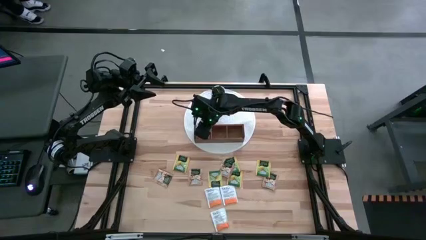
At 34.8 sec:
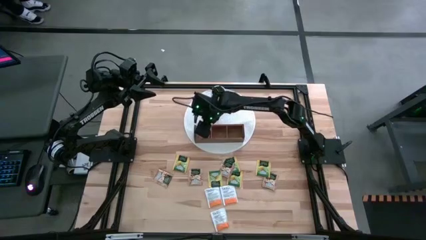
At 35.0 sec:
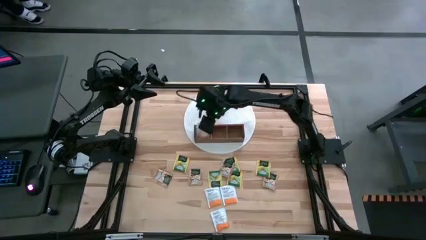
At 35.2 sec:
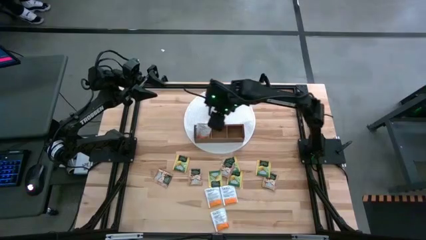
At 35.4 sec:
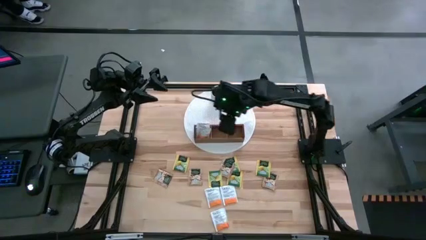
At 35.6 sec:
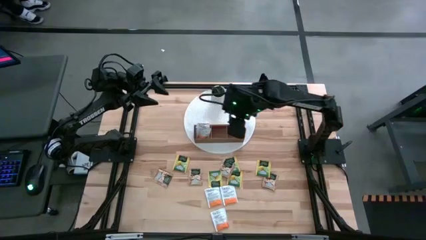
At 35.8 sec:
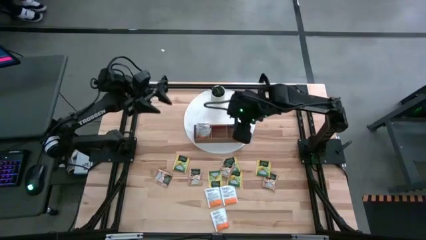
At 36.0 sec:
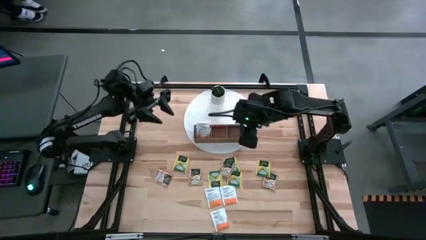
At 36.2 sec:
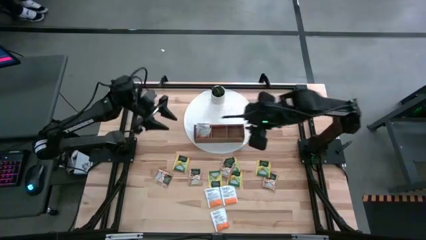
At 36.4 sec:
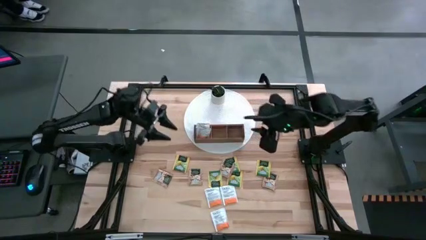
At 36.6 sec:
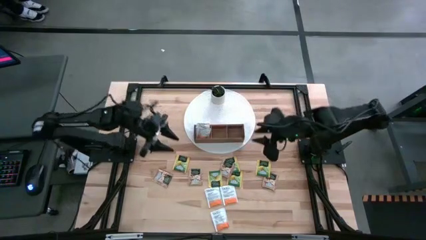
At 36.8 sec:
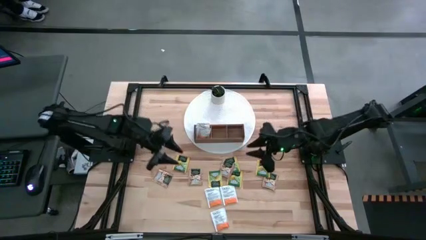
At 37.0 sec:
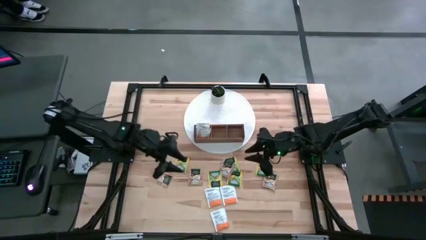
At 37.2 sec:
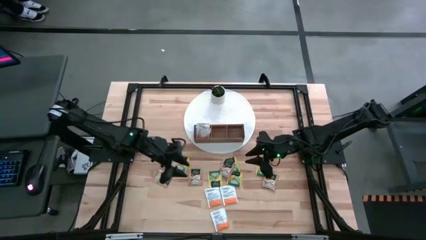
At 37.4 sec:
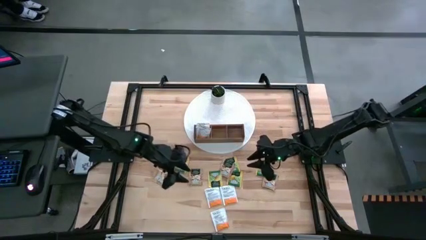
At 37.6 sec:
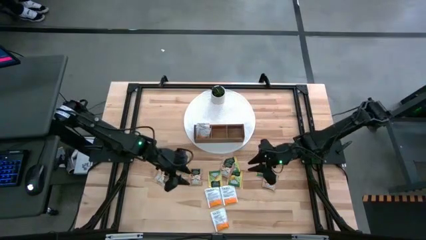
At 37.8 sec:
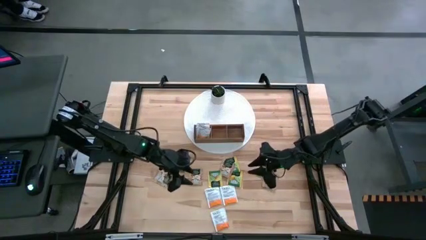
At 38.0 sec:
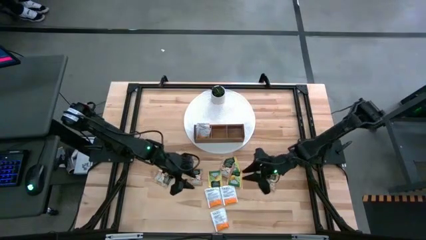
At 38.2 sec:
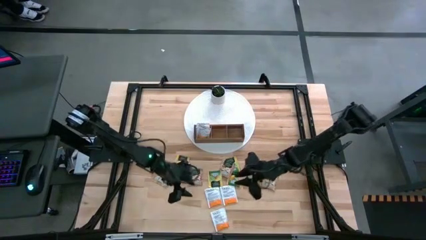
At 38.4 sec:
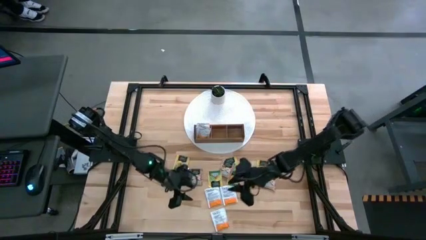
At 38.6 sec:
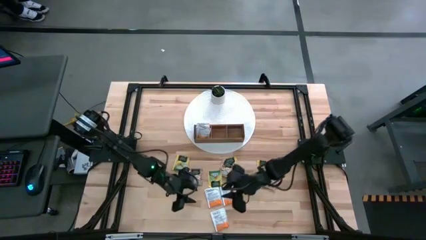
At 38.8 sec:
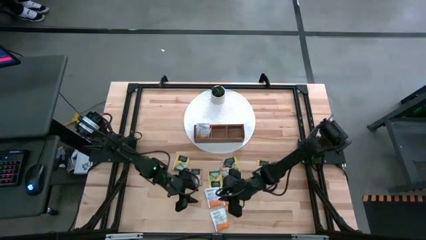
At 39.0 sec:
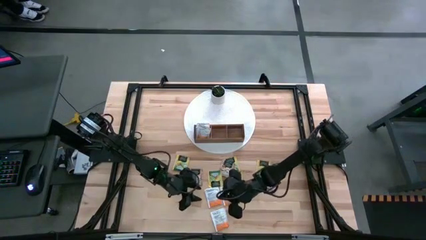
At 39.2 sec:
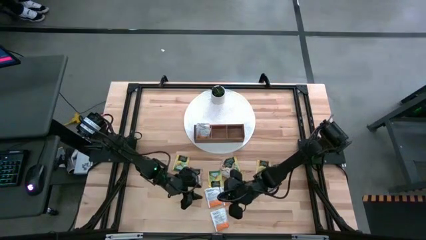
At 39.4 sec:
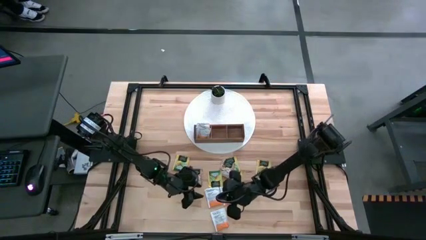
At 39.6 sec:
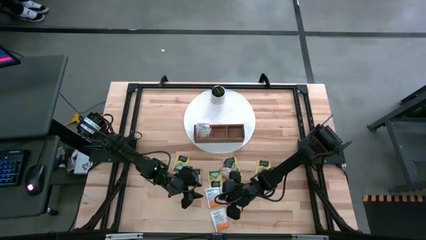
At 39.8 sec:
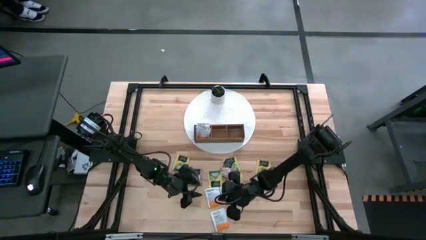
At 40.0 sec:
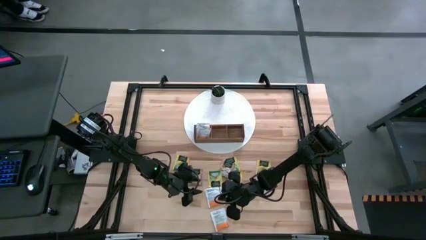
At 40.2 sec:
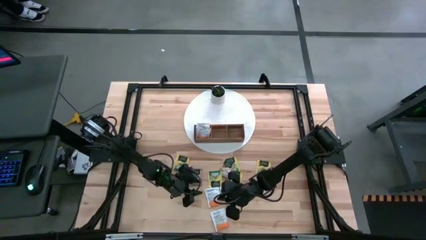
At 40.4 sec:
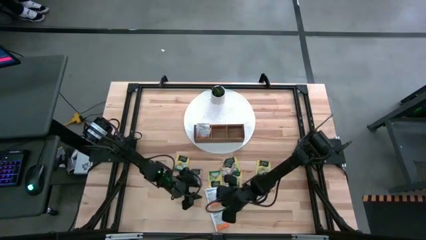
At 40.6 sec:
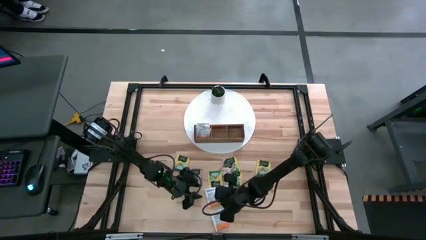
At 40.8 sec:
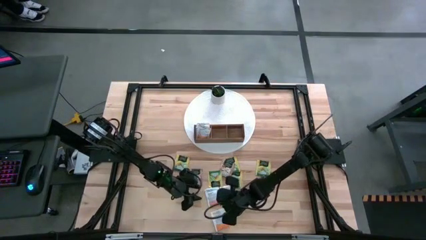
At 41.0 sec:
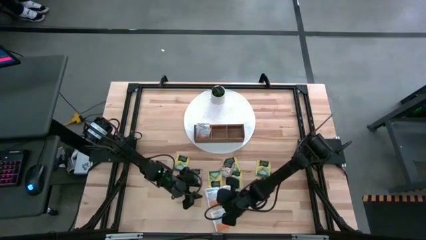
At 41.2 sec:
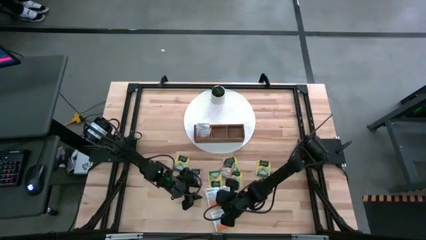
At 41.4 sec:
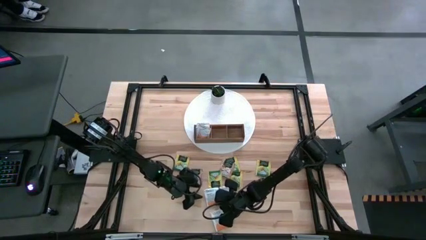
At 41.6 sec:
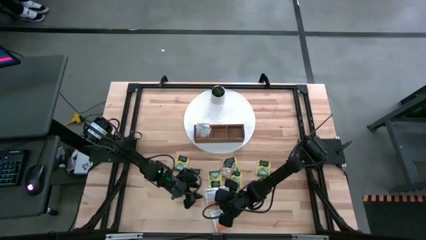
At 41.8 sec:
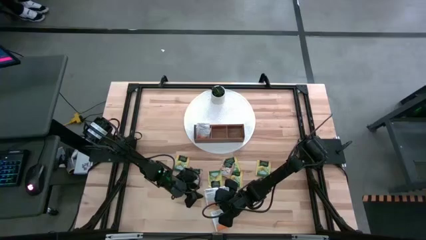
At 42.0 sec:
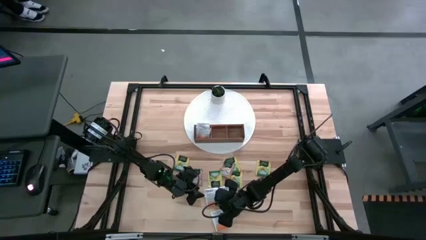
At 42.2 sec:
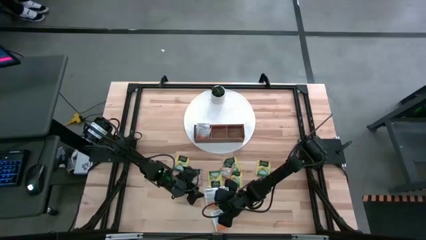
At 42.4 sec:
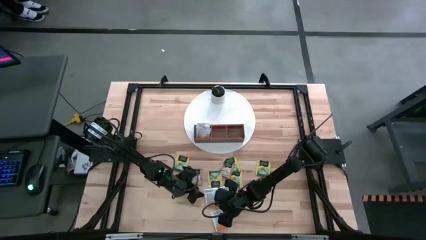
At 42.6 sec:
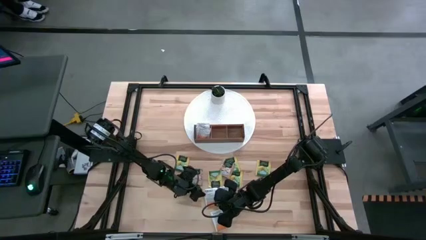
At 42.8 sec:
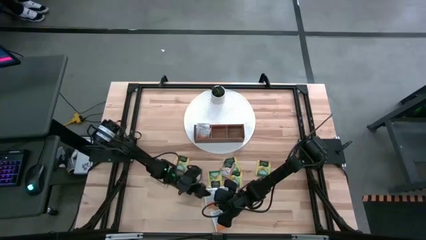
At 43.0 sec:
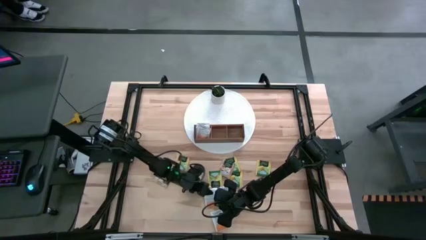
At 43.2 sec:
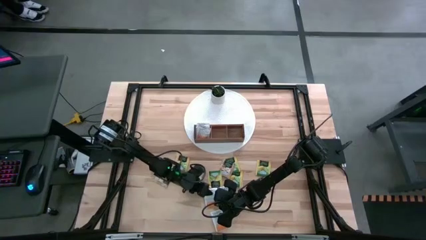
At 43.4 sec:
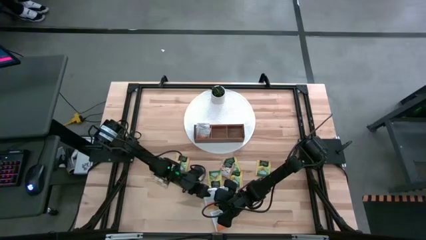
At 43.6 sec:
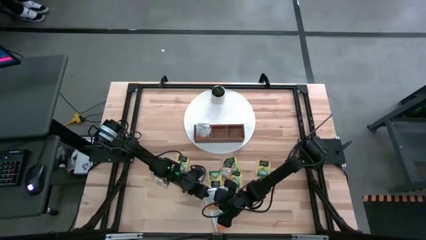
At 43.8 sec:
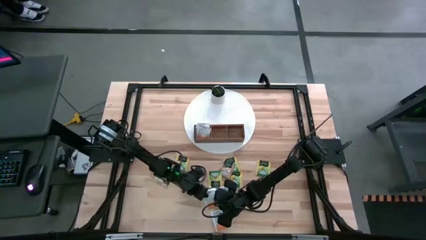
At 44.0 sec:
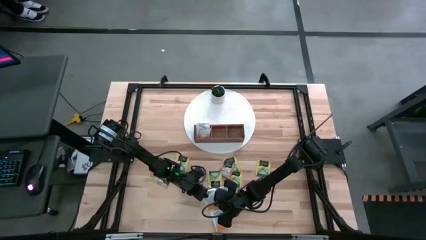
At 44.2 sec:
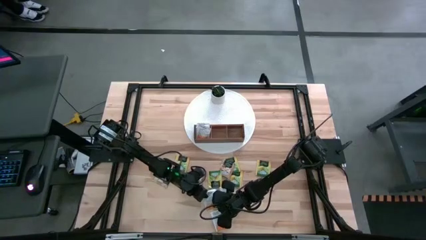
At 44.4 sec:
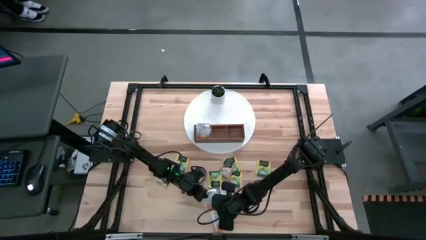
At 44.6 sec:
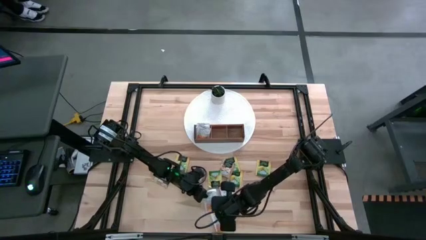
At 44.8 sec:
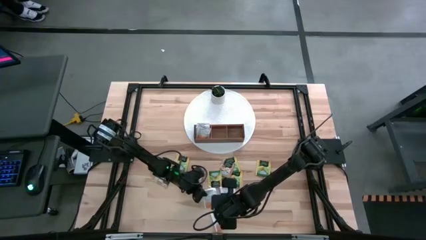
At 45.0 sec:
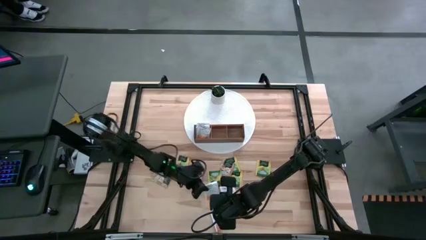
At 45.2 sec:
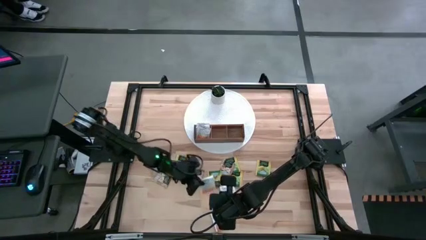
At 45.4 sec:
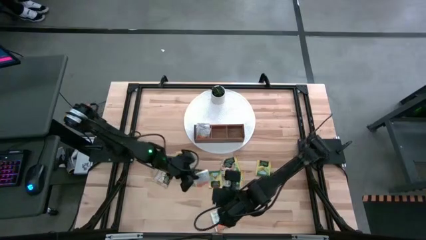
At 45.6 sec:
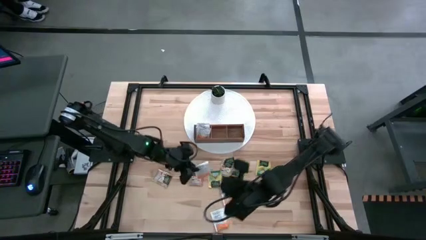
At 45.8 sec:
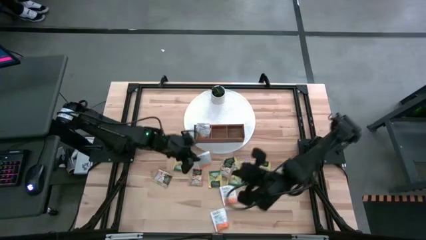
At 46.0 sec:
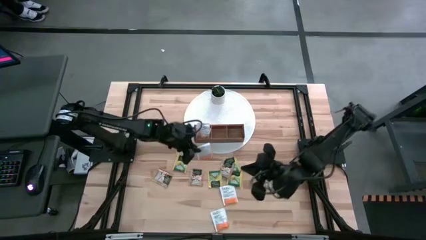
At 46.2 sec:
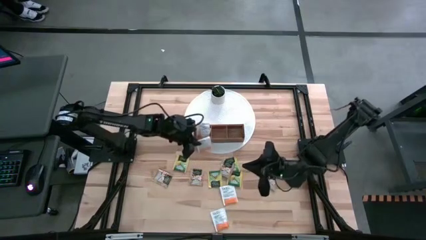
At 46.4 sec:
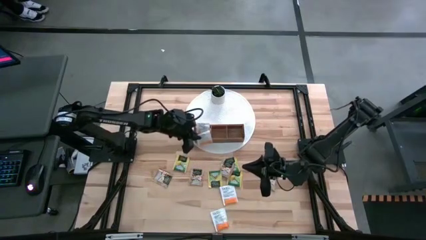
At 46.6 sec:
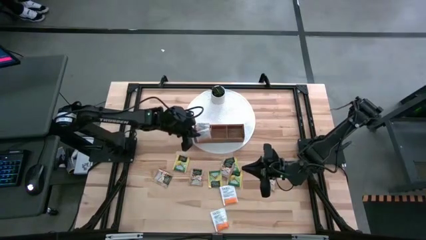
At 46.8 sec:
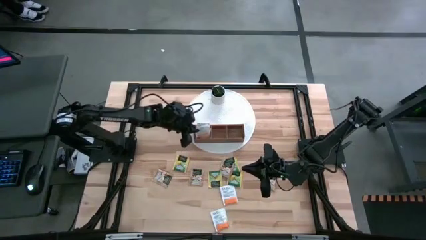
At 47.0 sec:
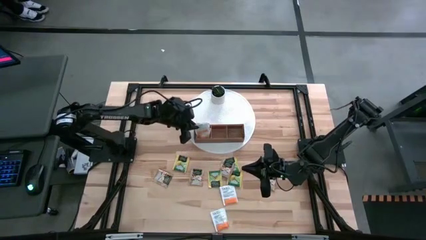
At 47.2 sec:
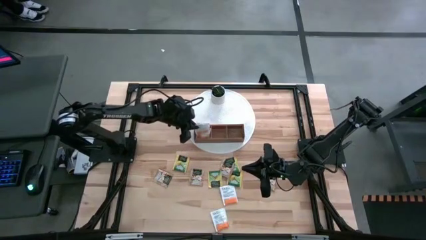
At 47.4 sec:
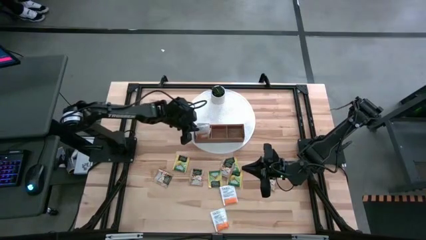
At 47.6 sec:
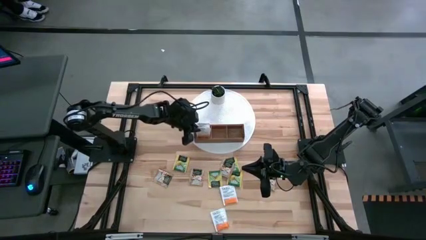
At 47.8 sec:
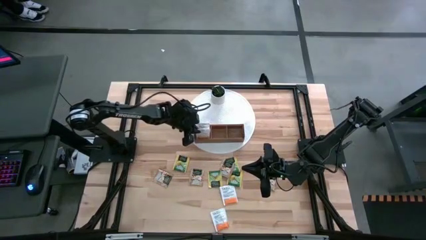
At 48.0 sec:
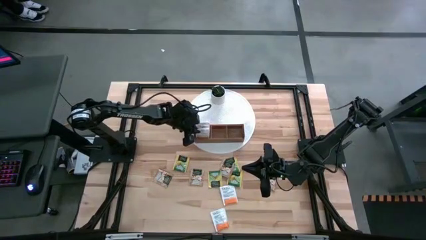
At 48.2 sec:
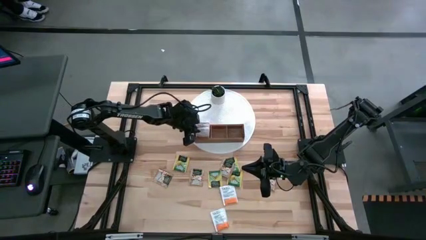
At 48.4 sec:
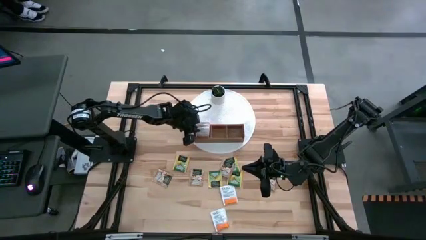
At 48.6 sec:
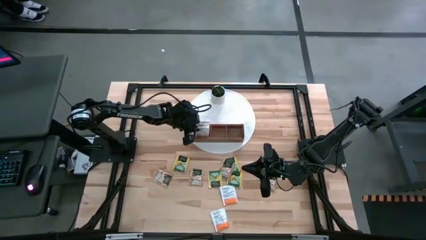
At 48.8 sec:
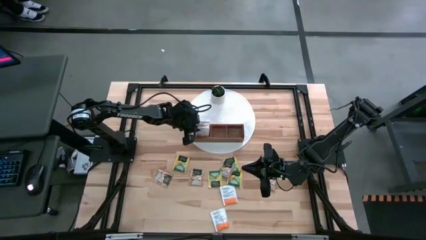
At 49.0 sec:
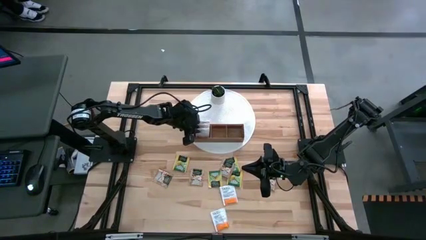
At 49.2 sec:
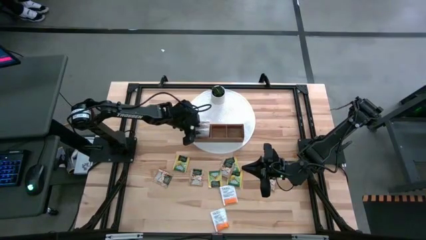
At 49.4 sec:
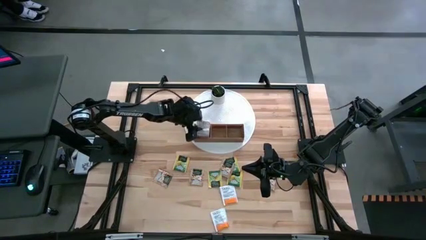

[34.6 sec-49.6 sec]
Task: Pick & Place Tea
Put the white tea bag into the left section of the wooden organizer
